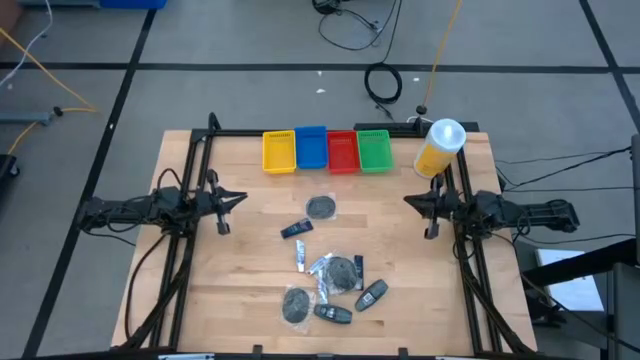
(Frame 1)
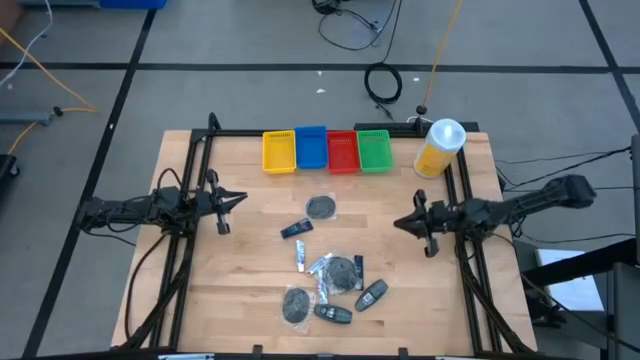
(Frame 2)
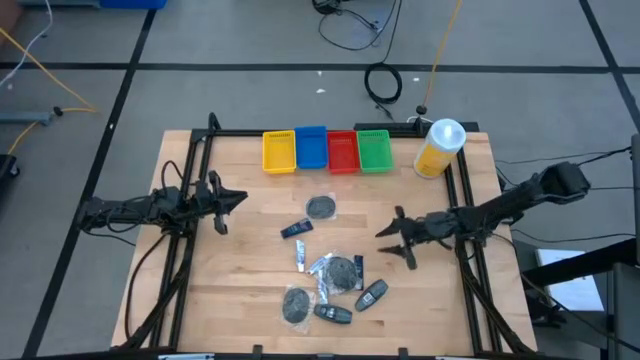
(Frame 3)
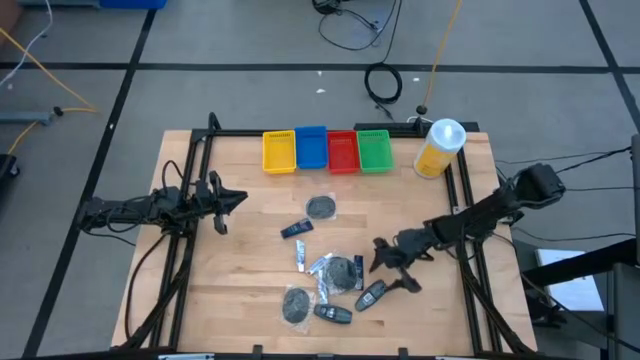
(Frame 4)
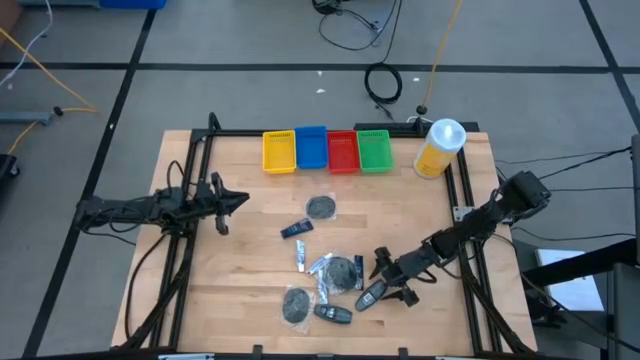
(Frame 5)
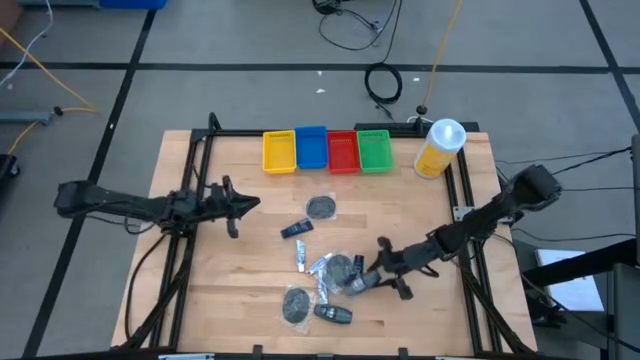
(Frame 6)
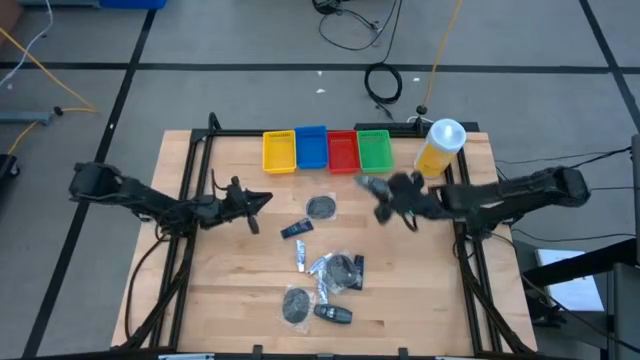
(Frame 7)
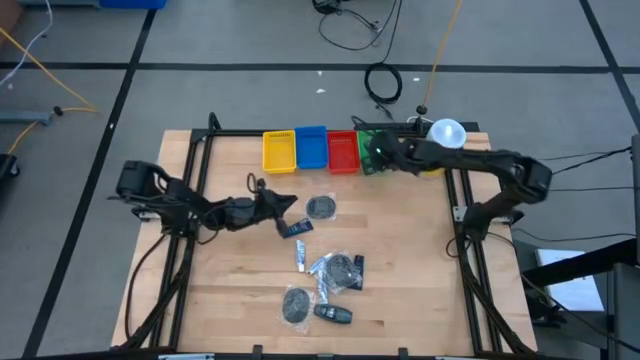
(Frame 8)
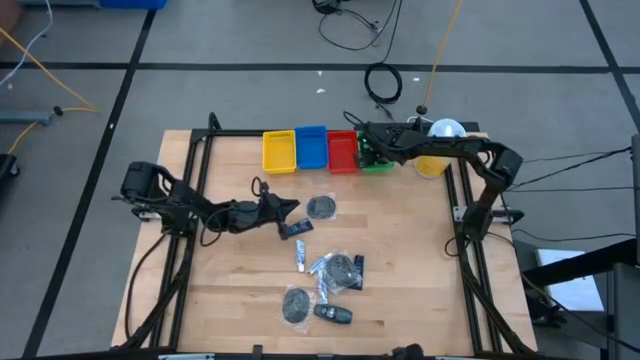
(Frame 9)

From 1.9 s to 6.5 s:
Task: Pick & Place Travel size toiletries
Put the gray deodorant into the green basket

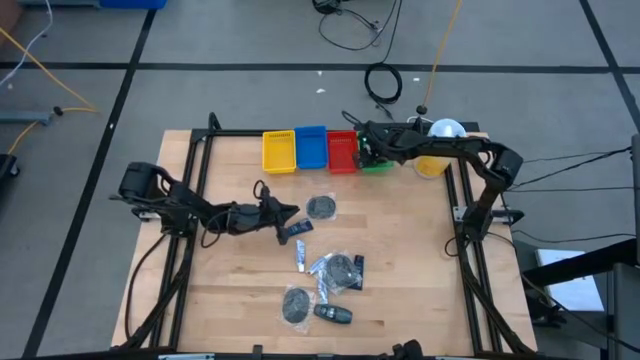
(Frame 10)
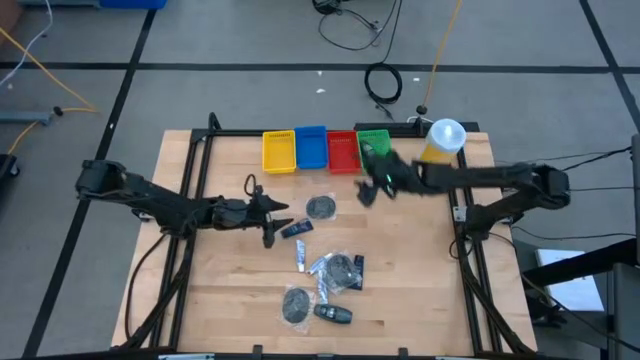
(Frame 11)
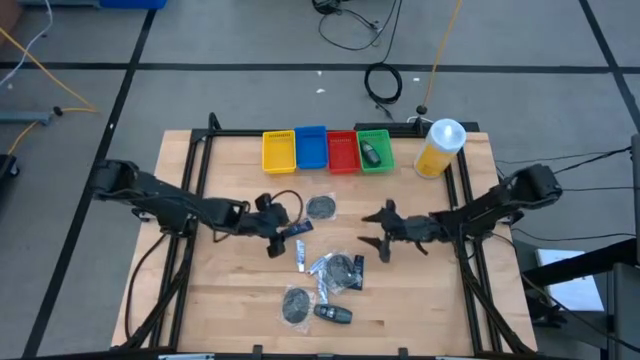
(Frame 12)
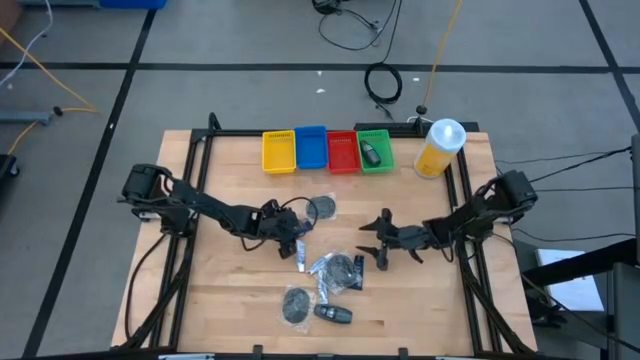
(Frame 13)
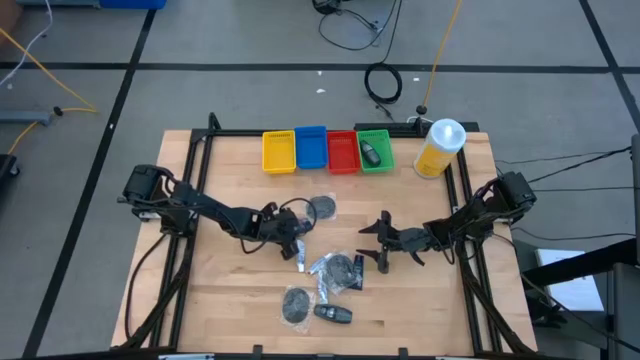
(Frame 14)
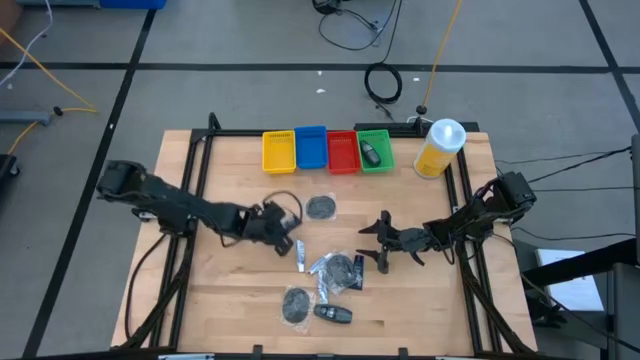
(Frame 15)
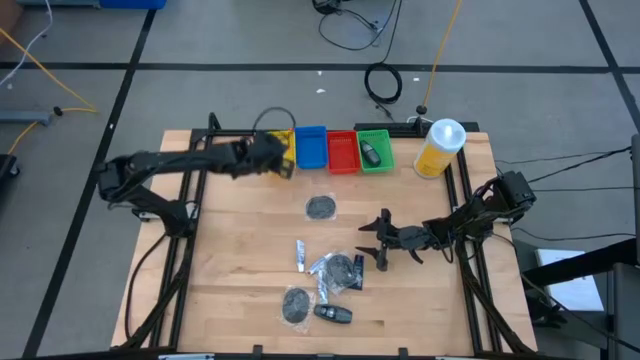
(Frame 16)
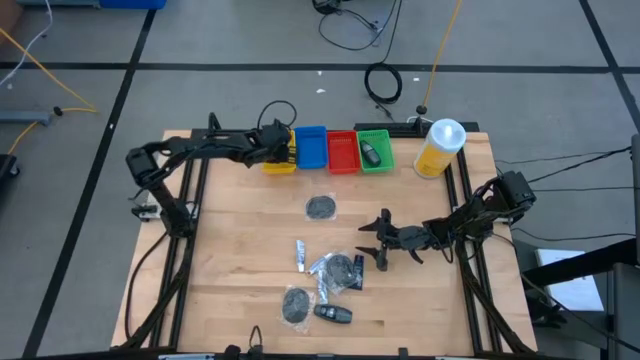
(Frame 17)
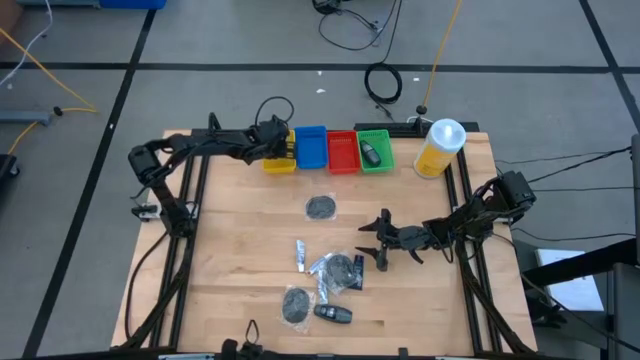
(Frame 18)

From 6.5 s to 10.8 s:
Put the blue shave cream into the yellow basket

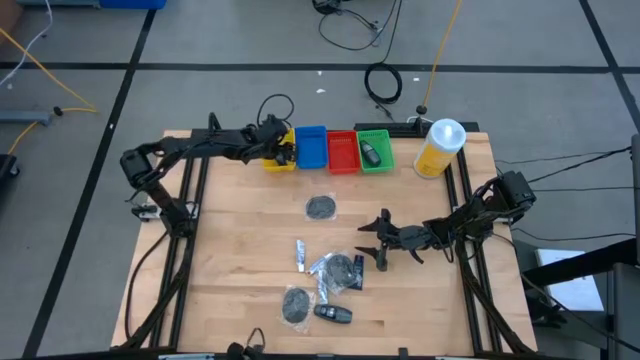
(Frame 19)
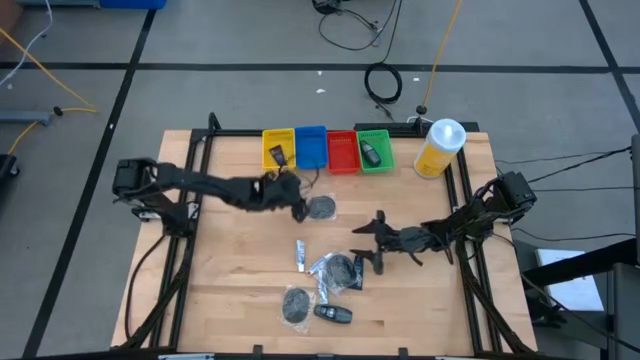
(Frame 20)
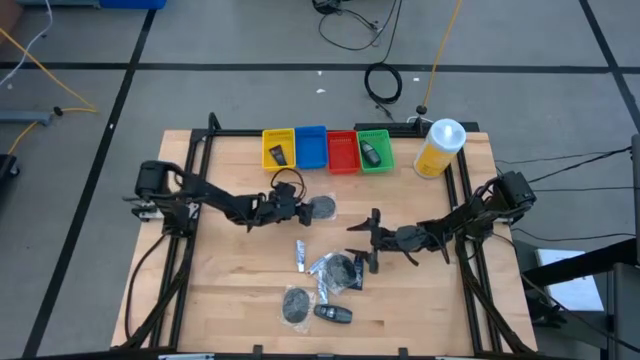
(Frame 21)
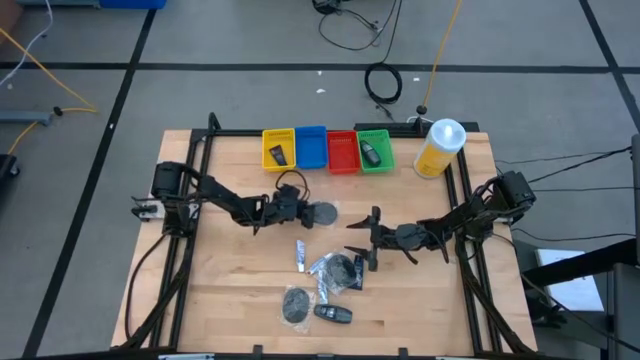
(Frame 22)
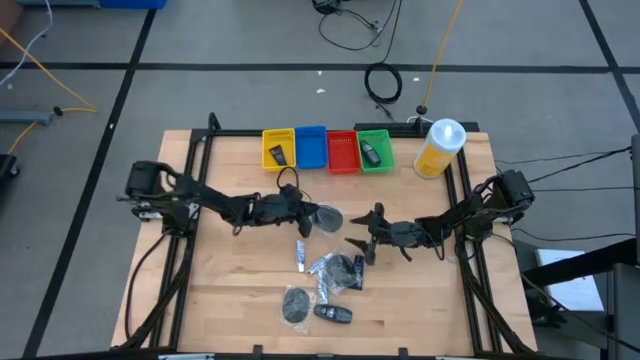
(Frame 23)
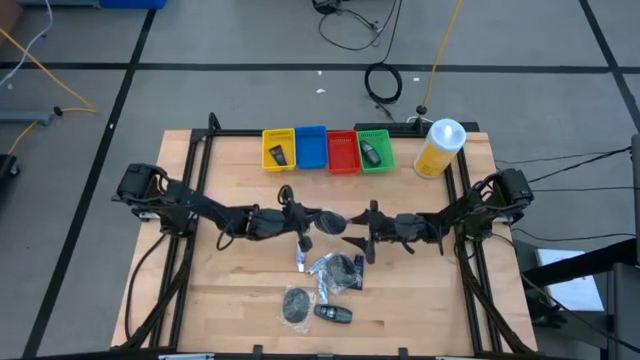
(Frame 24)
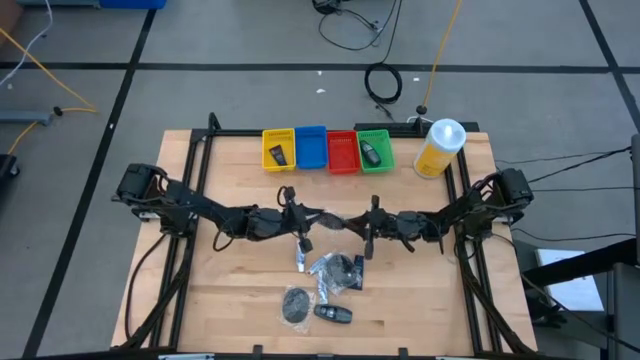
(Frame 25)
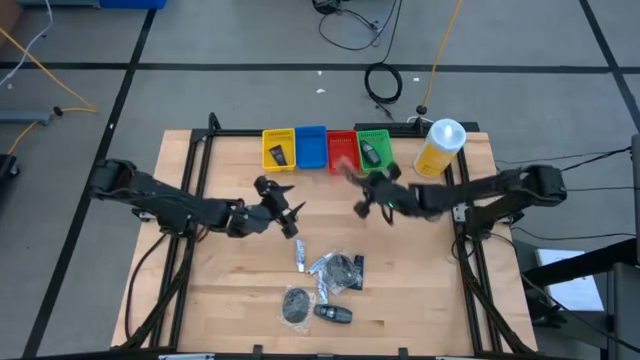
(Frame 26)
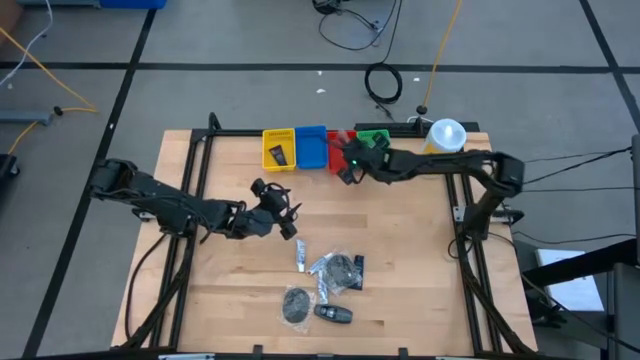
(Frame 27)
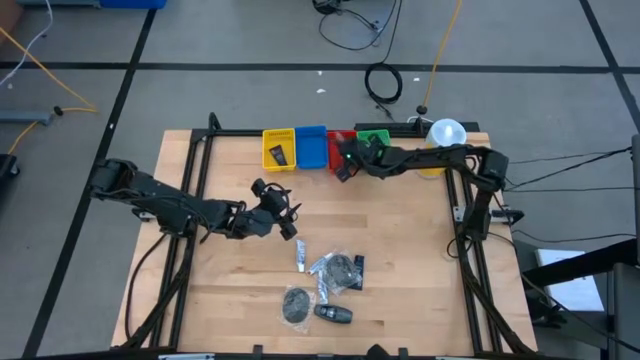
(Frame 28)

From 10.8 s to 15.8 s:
Put the black hairbrush into the red basket

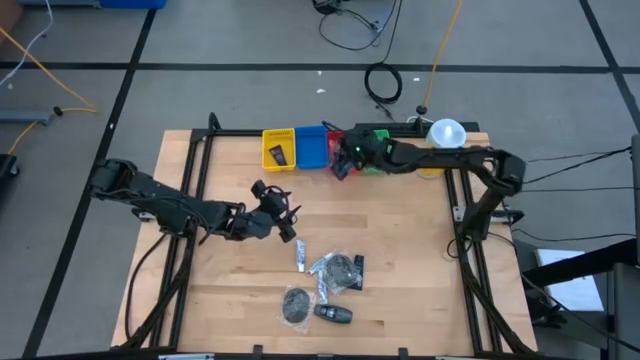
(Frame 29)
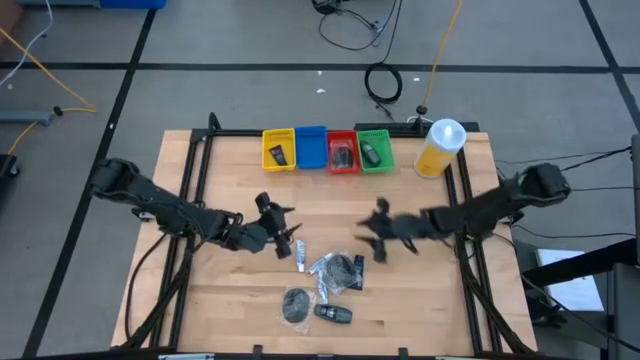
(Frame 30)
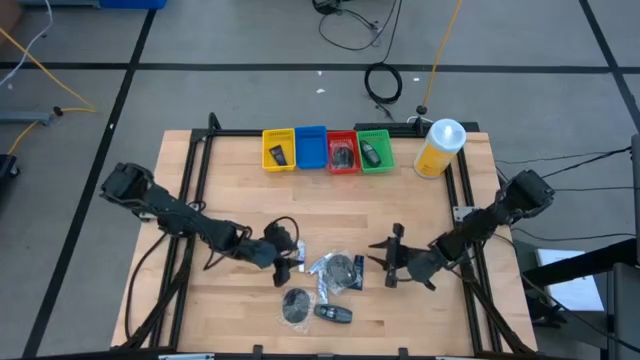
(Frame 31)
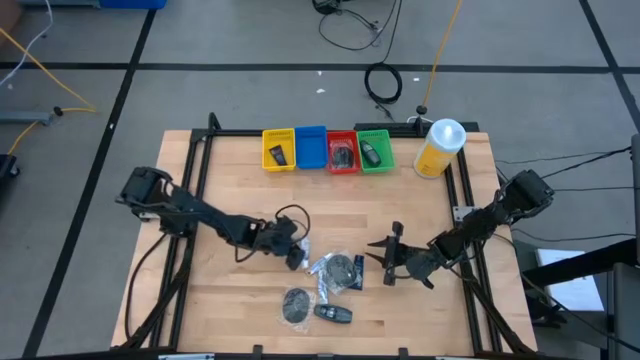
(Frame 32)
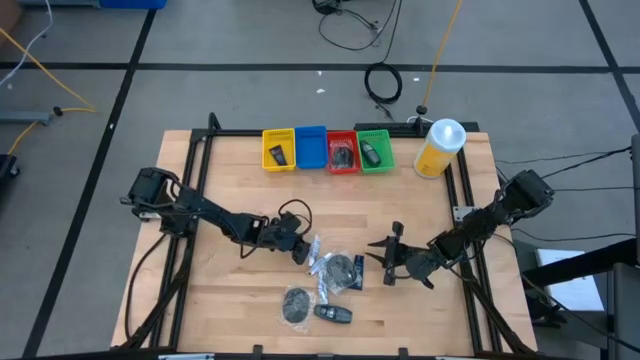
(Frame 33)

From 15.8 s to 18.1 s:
Put the white toothpaste into the blue basket

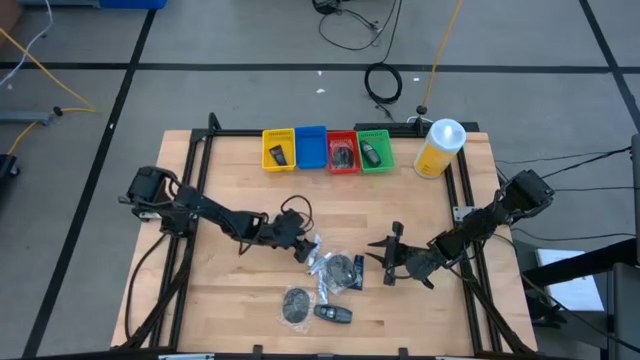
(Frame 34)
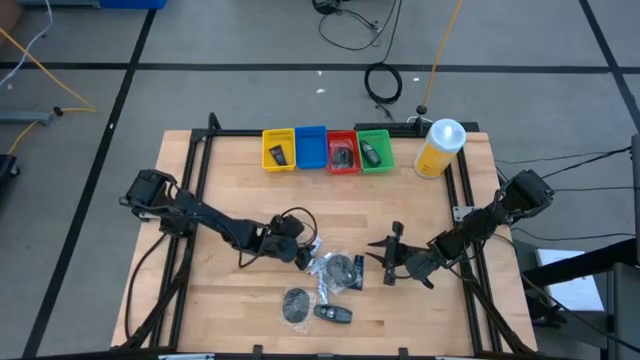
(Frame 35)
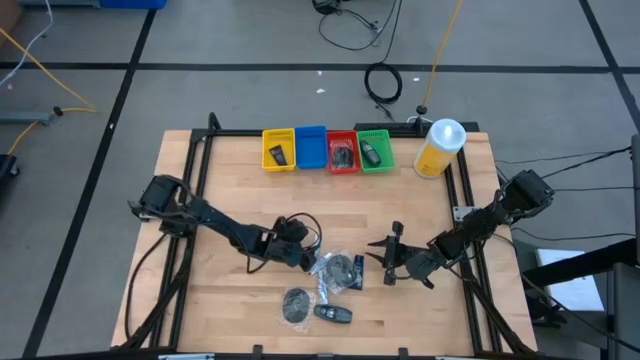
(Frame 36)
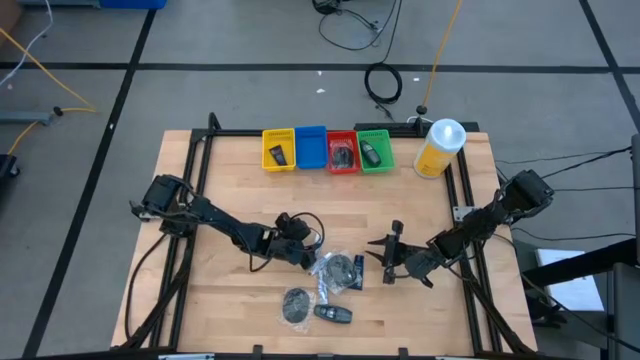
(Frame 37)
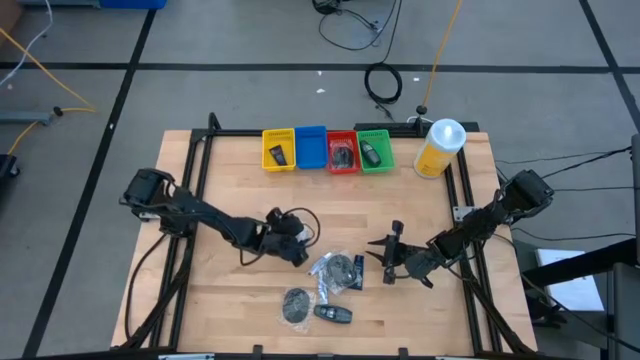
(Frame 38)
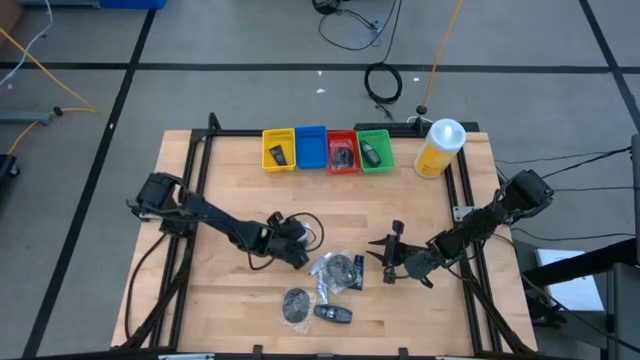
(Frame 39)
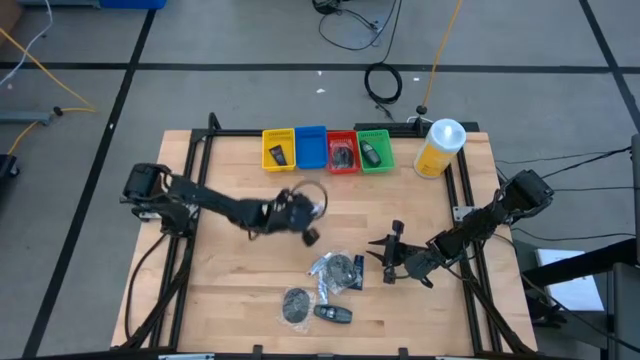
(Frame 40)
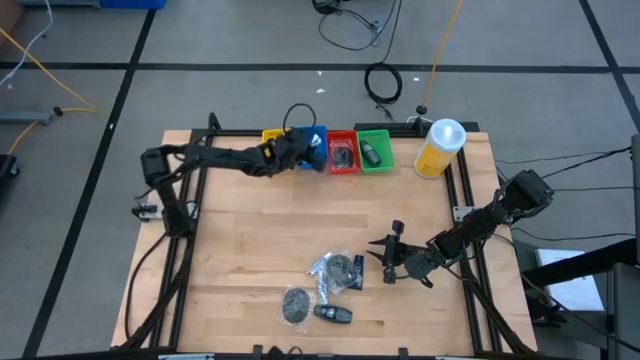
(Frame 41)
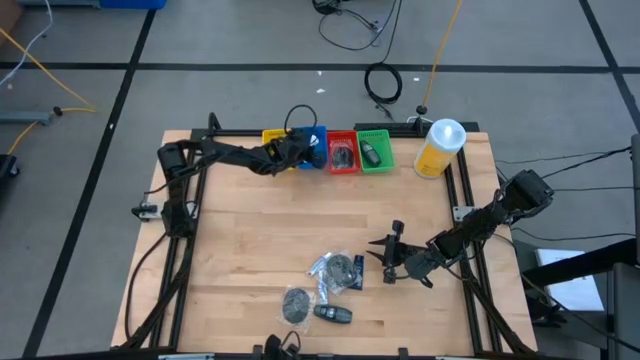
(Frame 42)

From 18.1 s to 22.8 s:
Put the white toothpaste into the blue basket
